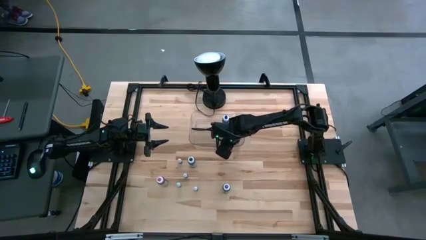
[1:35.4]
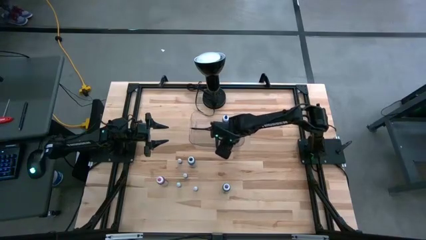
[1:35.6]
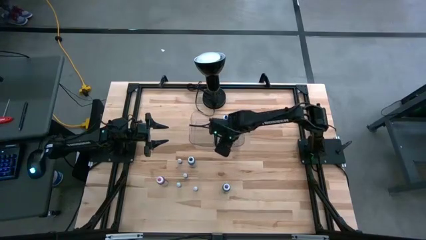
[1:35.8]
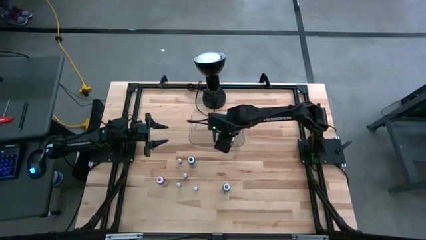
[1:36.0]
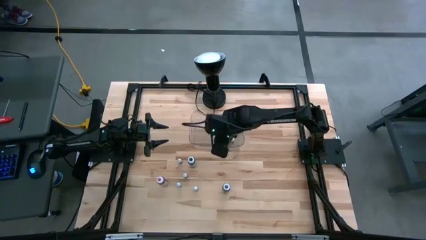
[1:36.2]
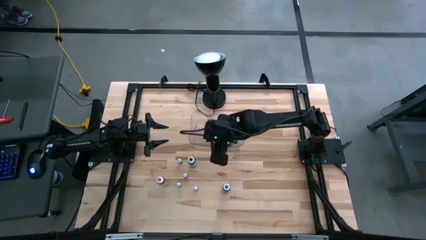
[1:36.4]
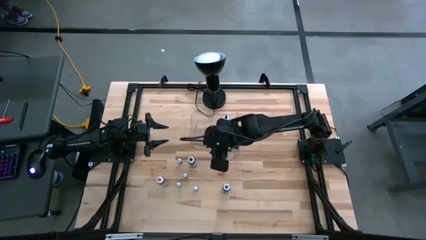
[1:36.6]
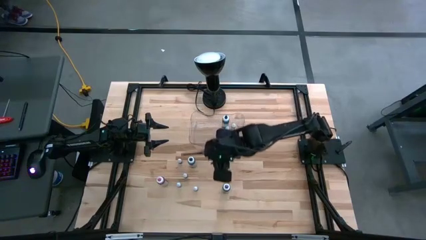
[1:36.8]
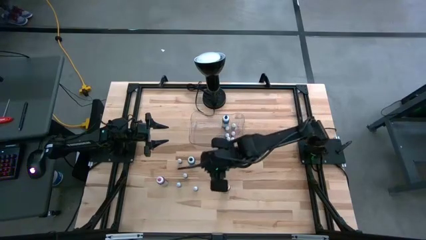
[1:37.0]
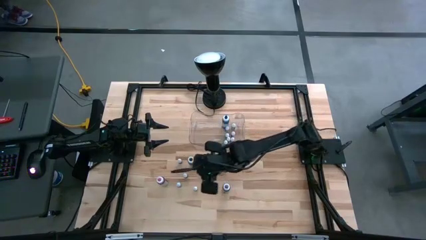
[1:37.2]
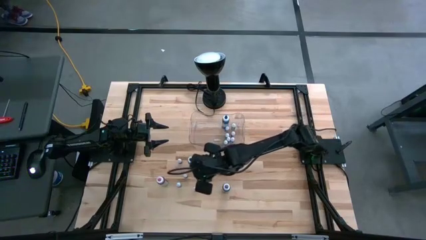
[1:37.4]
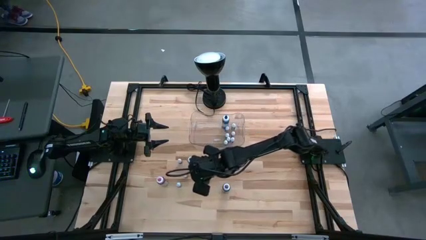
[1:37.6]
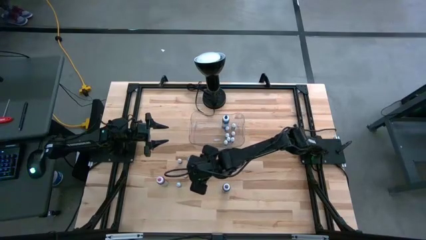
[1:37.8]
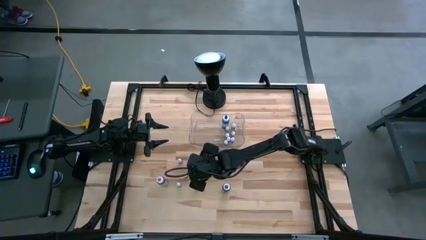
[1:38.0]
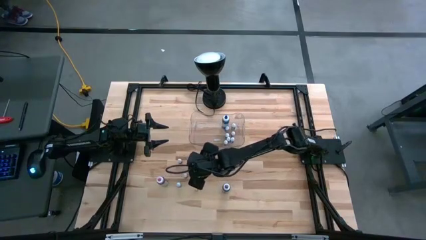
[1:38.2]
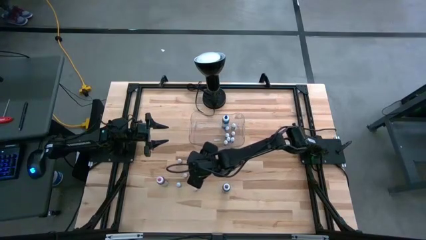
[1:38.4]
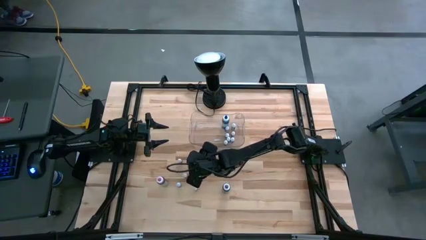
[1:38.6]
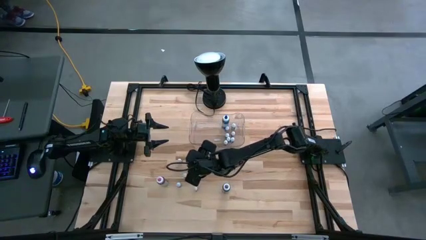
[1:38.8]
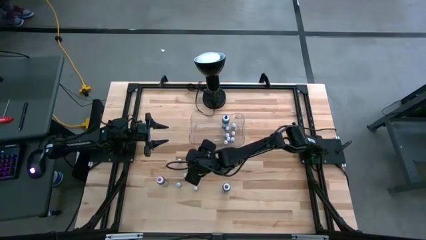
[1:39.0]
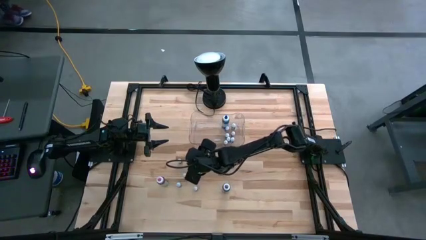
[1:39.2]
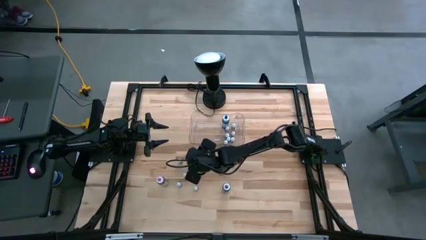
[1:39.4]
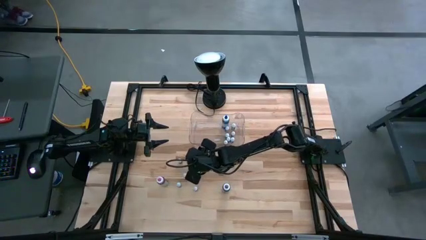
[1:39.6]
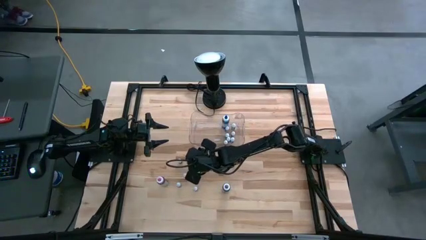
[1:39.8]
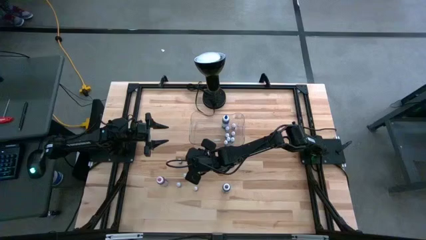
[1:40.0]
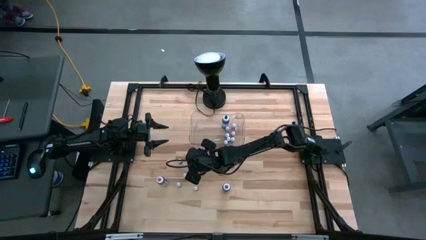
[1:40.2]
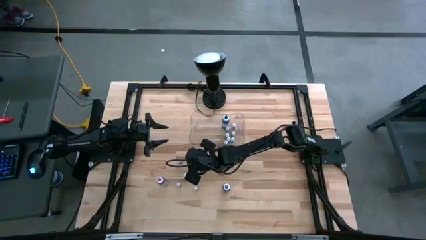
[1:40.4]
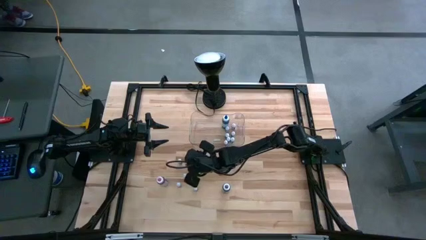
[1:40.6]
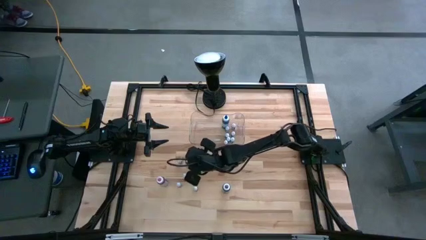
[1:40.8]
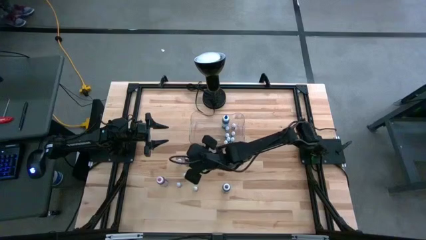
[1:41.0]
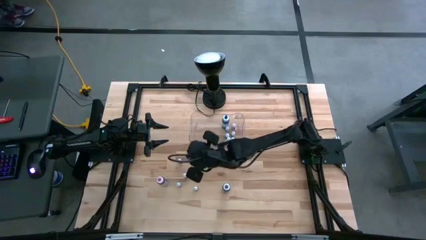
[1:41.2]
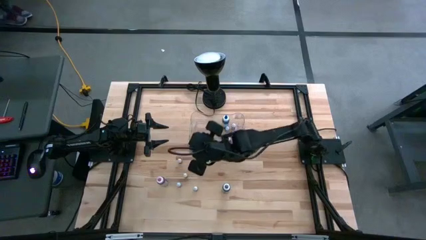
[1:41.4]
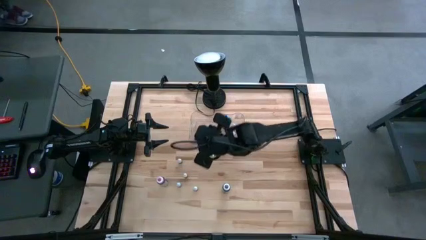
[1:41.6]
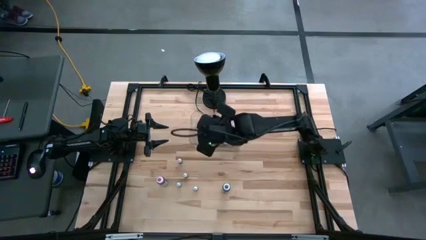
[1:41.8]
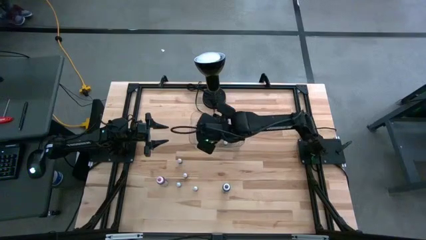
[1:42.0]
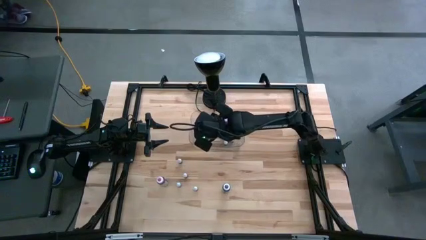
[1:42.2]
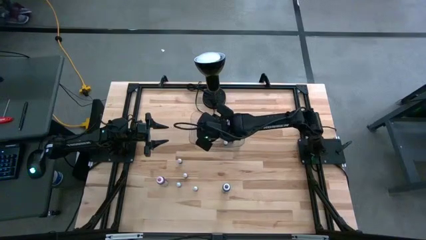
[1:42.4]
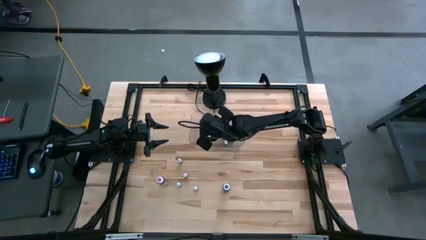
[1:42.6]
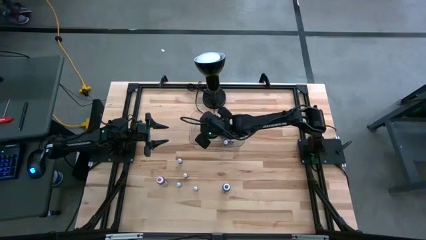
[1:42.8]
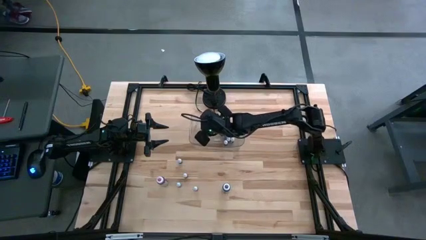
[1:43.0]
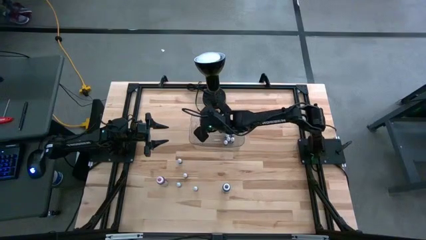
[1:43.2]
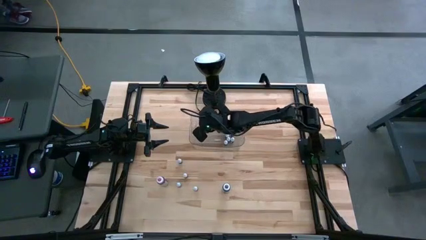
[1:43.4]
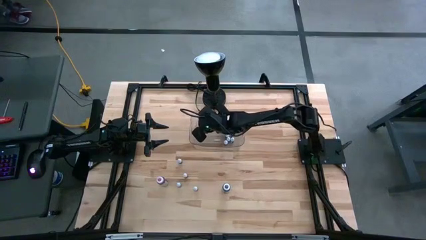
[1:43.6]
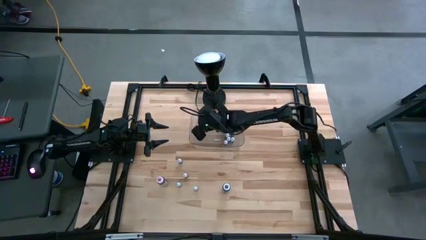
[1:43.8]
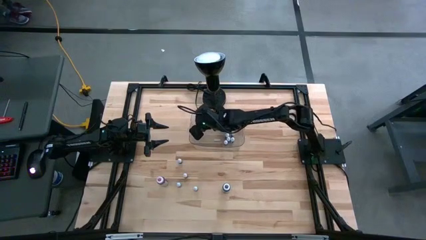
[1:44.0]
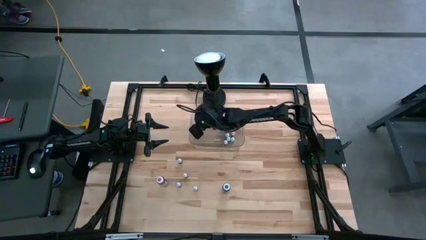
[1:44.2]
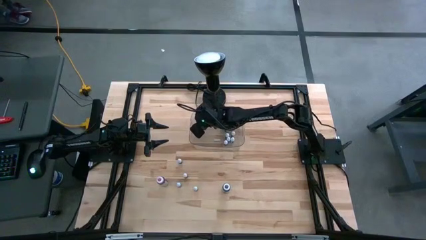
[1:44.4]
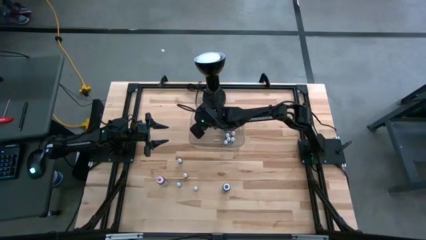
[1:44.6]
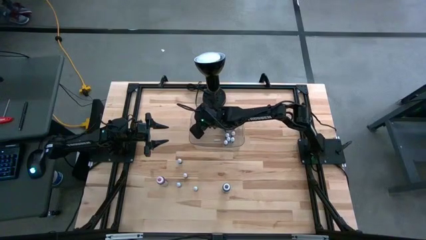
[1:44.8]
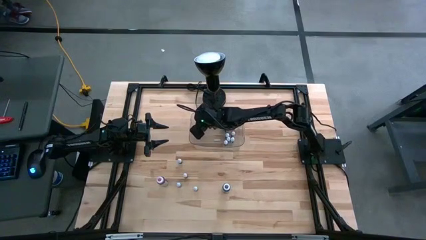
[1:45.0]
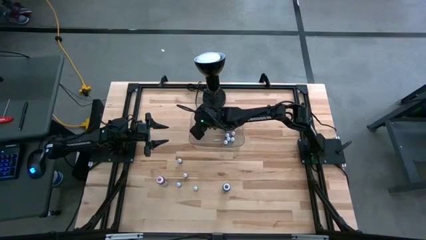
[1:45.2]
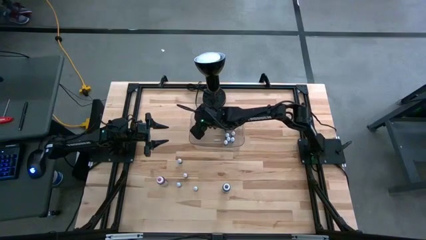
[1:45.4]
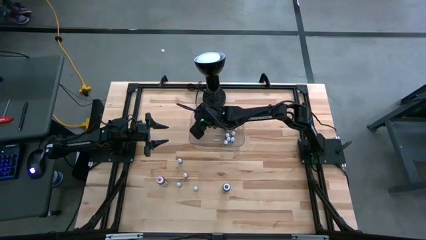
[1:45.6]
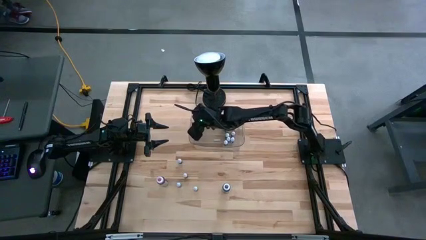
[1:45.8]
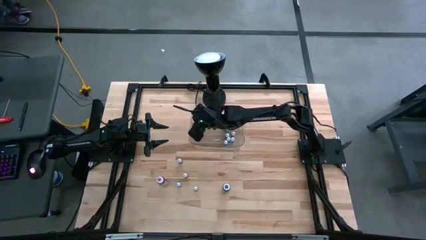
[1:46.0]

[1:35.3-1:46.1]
Task: Pick & Place food coloring
Put the black food coloring bottle into the transparent bin

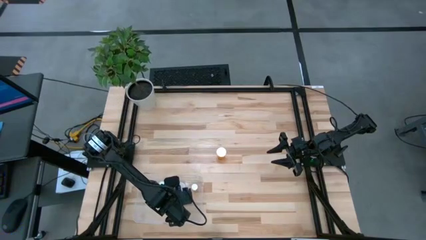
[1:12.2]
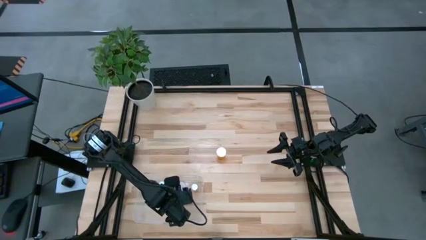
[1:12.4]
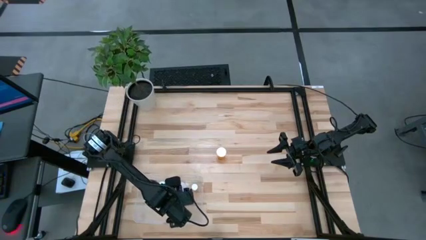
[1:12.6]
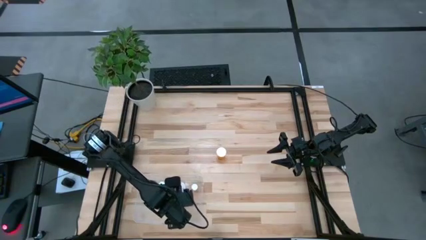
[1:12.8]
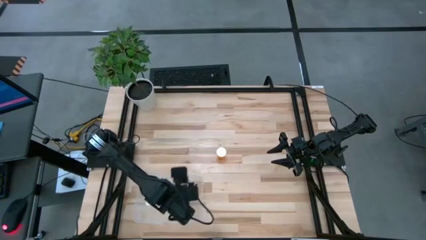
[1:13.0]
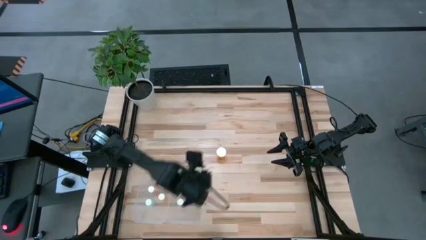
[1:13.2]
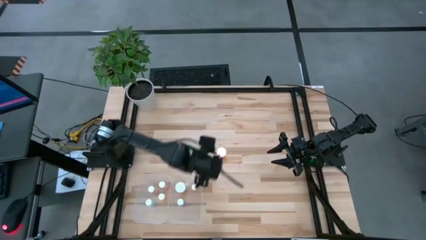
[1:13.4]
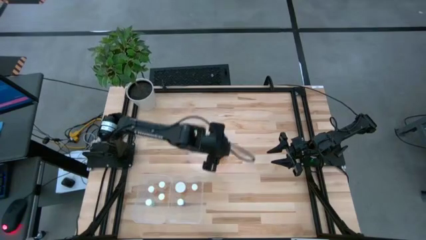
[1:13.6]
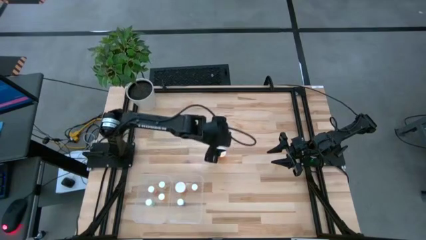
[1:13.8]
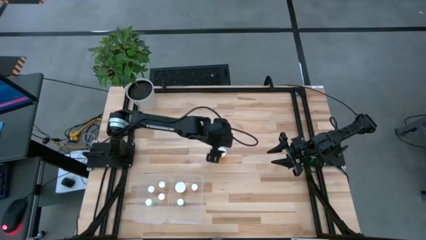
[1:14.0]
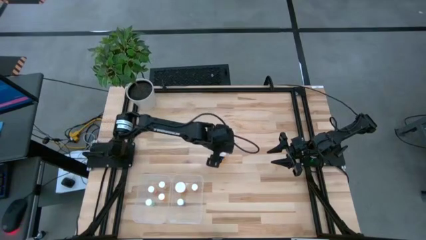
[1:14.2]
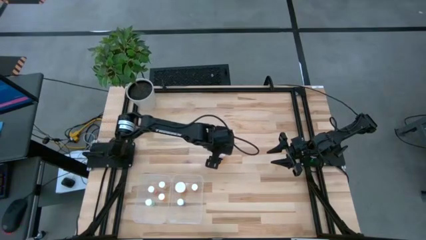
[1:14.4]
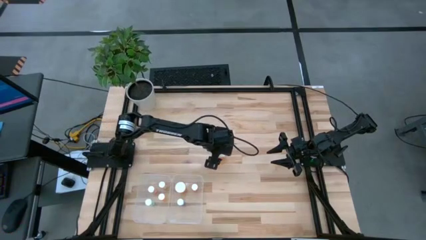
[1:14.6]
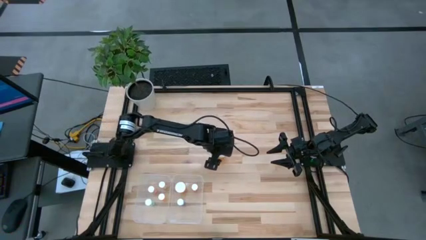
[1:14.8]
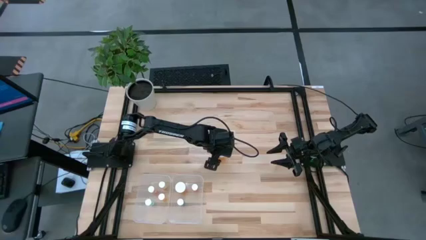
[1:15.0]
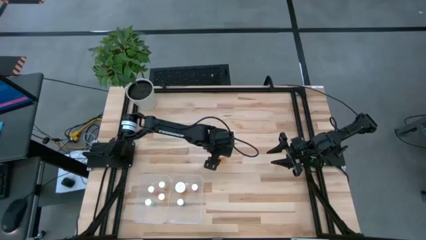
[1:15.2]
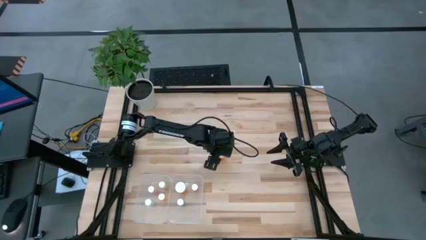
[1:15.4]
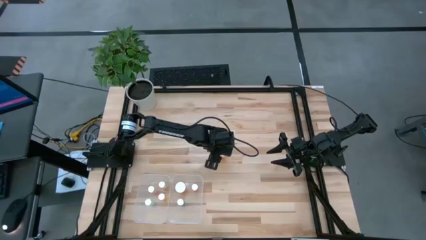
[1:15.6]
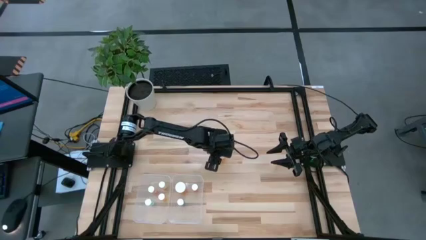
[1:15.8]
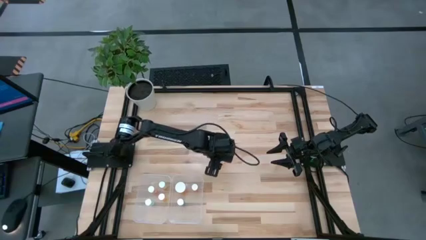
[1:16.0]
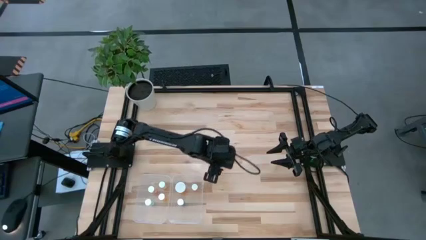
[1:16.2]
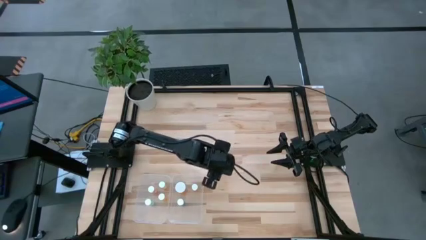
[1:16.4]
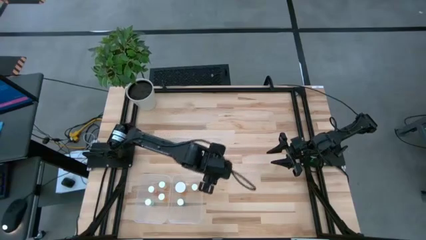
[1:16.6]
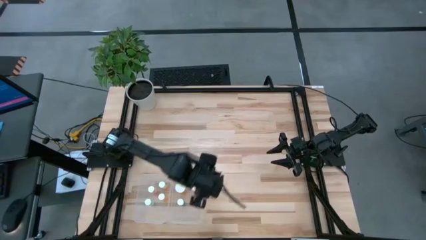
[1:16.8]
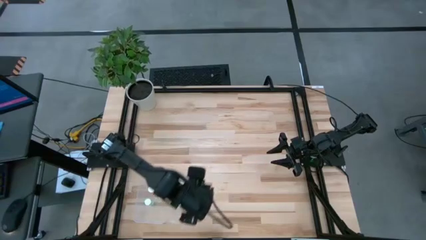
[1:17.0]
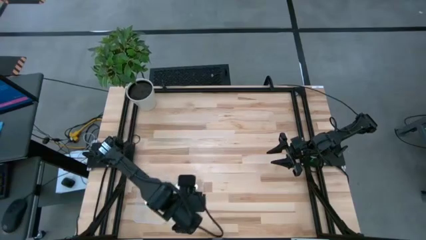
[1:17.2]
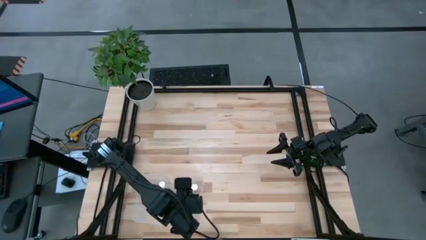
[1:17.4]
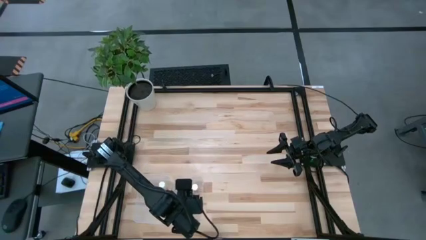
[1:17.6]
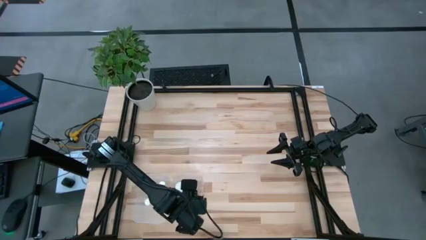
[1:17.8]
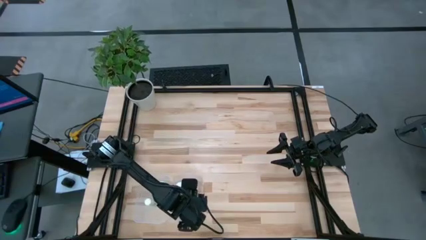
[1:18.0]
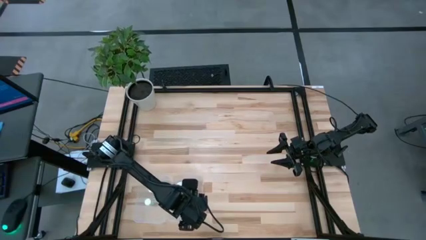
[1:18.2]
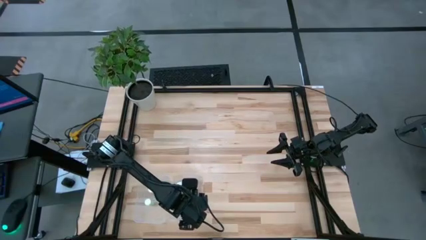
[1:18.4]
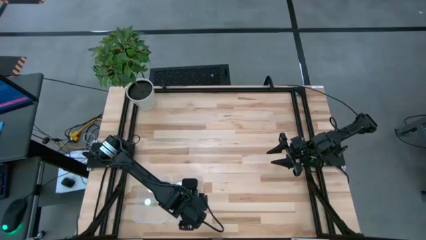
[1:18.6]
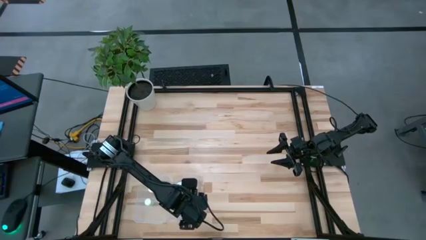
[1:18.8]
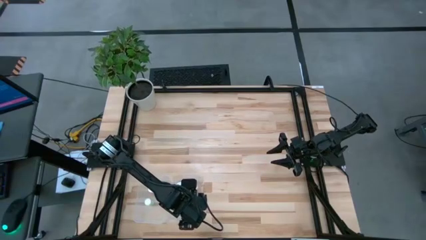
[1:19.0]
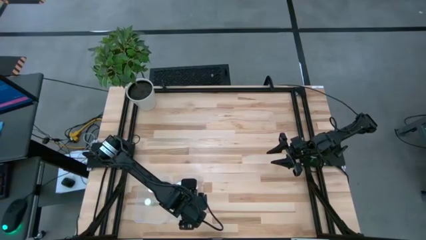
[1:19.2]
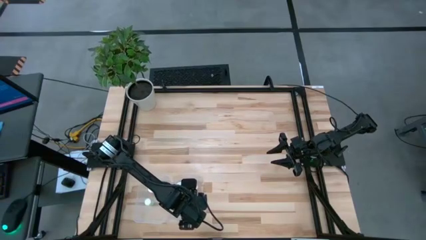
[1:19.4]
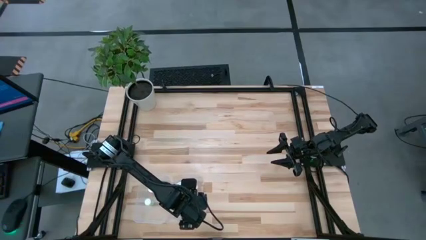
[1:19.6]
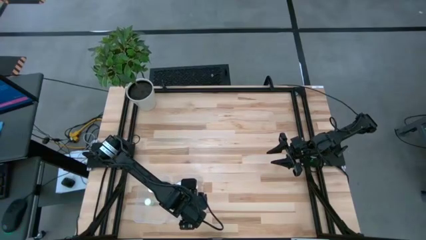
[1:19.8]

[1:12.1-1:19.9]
Task: Pick and place medicine bottles into bin by pill shape (circle, oval)
Put the large orange capsule bottle into the right transparent bin
